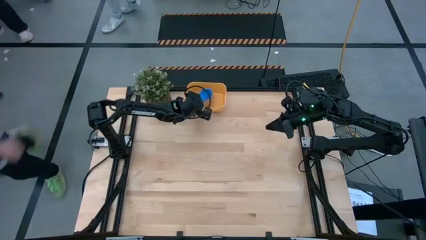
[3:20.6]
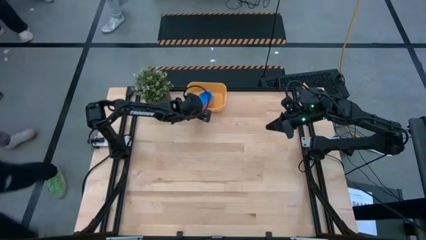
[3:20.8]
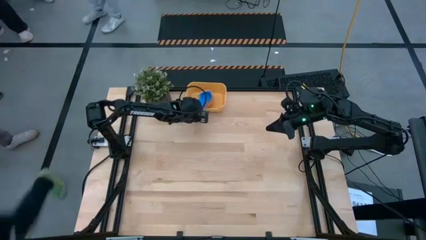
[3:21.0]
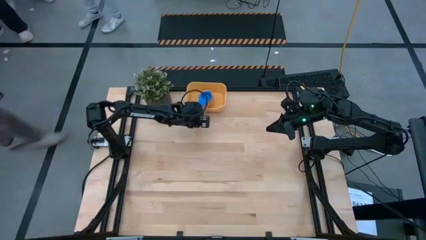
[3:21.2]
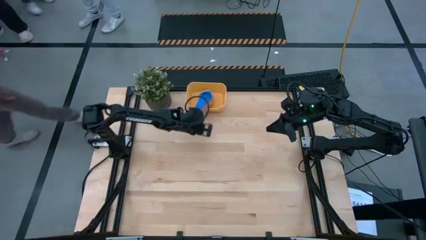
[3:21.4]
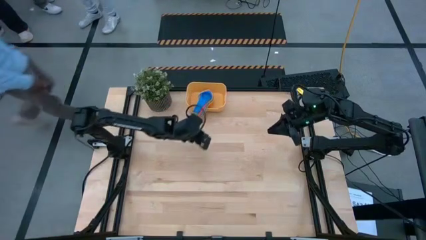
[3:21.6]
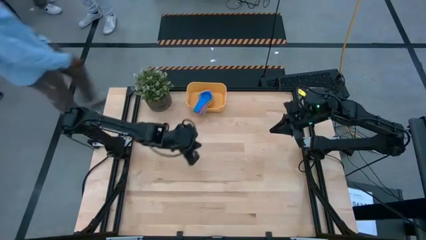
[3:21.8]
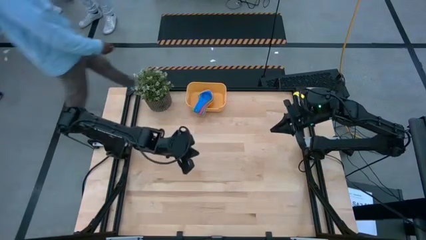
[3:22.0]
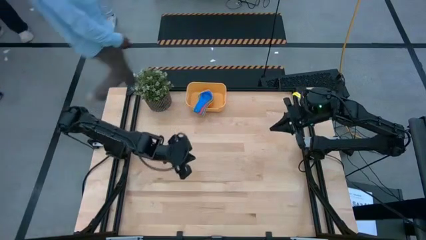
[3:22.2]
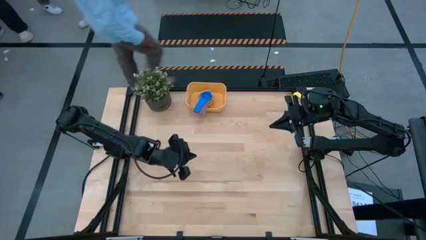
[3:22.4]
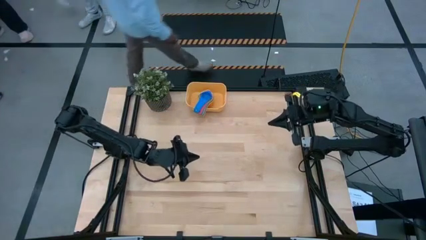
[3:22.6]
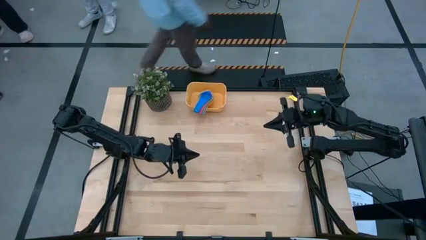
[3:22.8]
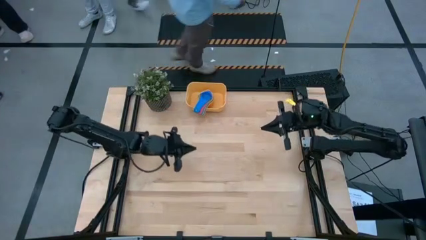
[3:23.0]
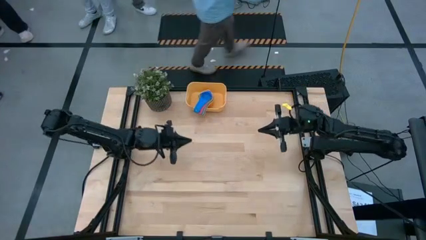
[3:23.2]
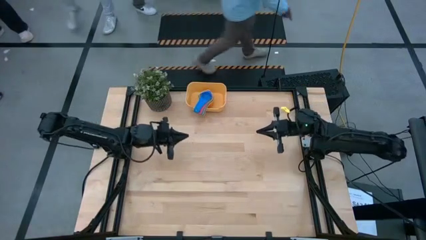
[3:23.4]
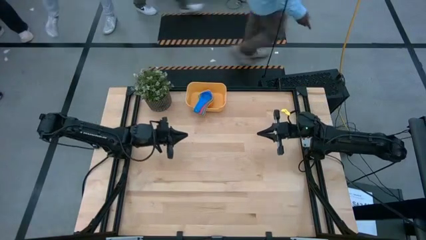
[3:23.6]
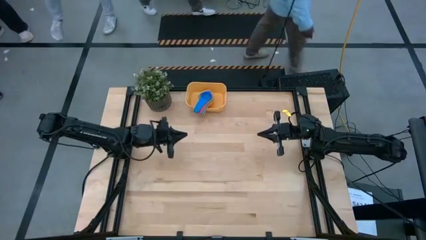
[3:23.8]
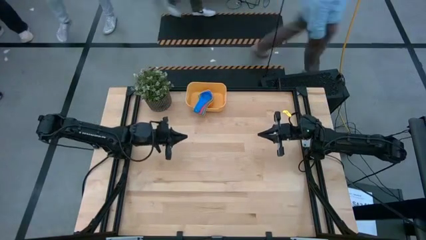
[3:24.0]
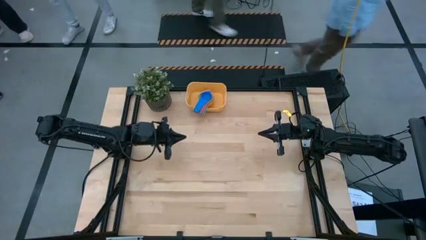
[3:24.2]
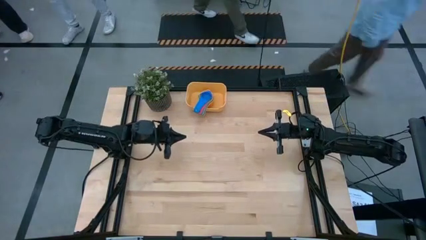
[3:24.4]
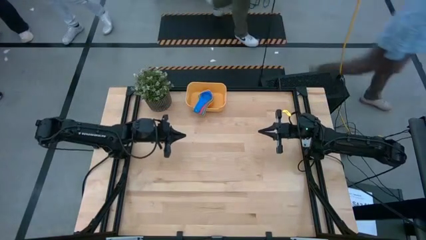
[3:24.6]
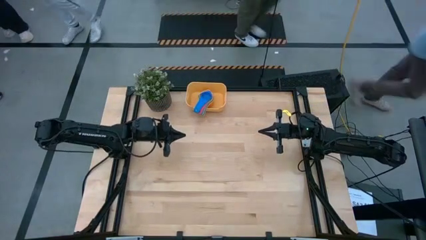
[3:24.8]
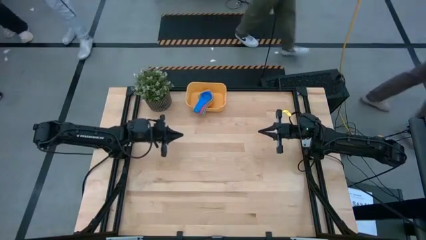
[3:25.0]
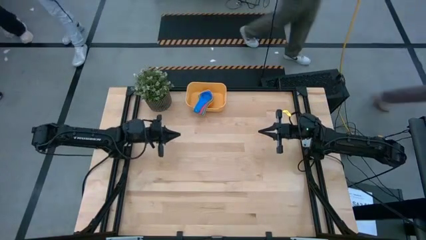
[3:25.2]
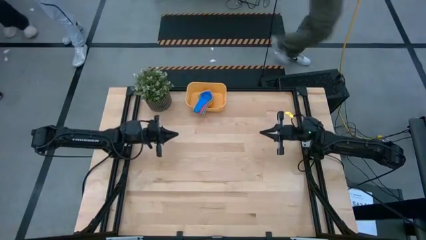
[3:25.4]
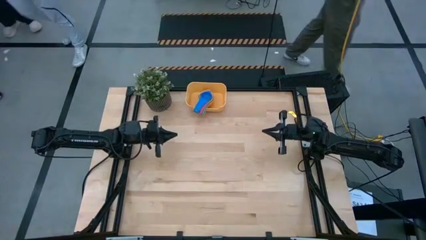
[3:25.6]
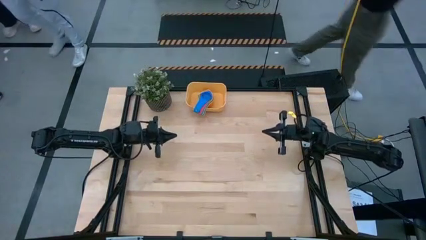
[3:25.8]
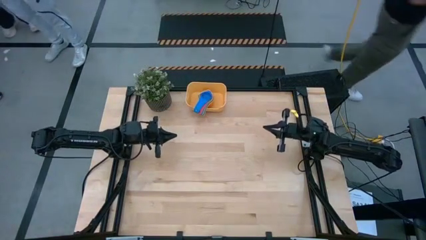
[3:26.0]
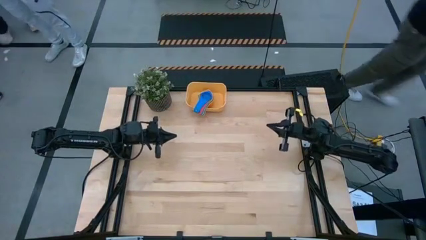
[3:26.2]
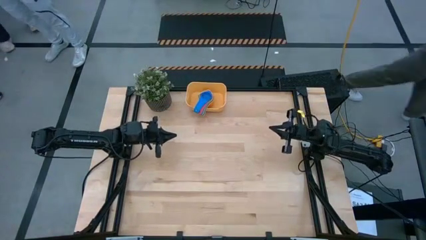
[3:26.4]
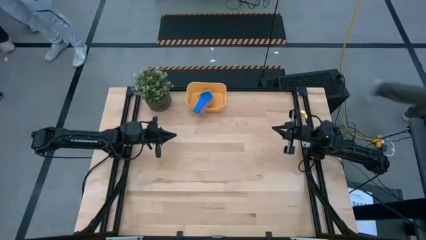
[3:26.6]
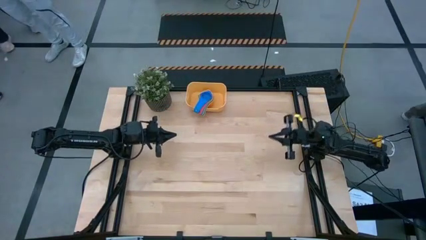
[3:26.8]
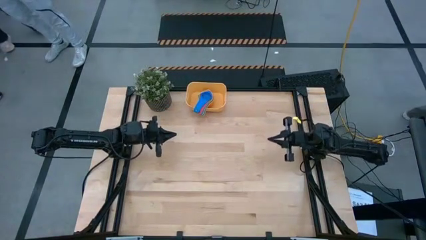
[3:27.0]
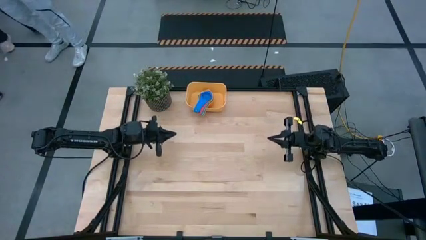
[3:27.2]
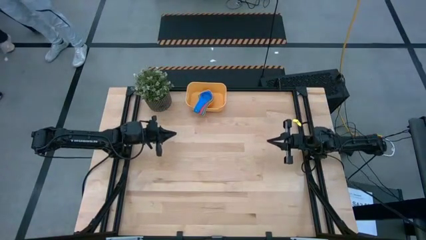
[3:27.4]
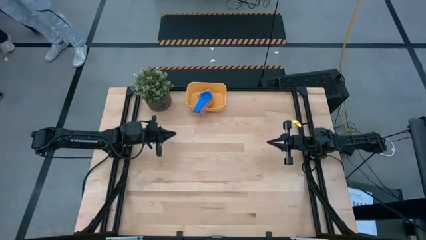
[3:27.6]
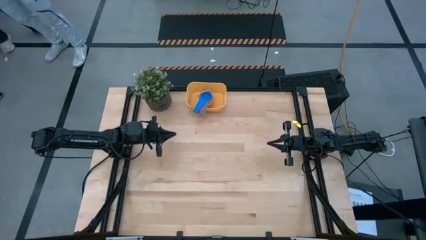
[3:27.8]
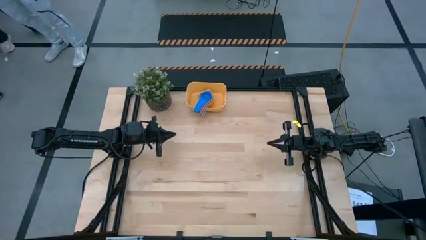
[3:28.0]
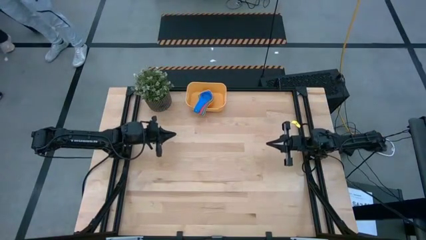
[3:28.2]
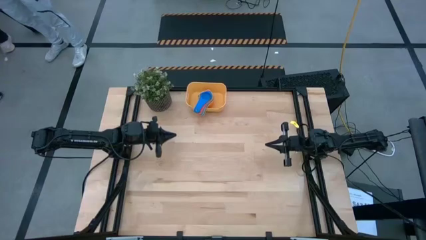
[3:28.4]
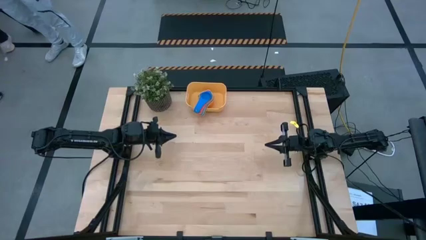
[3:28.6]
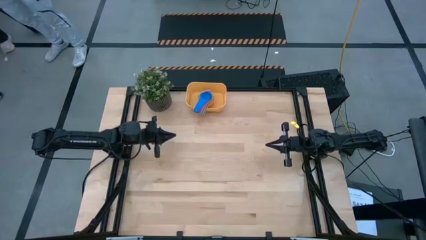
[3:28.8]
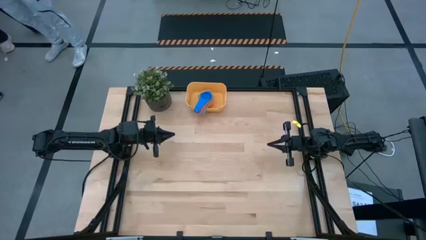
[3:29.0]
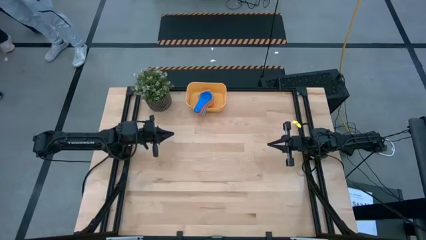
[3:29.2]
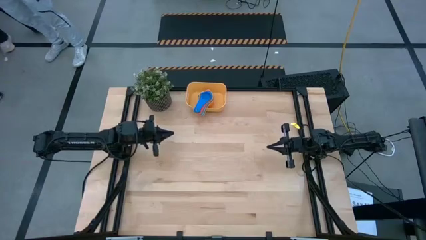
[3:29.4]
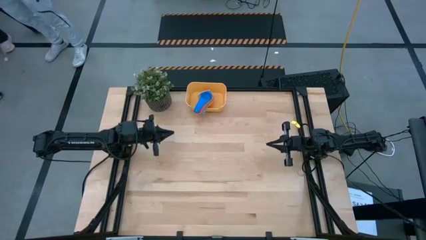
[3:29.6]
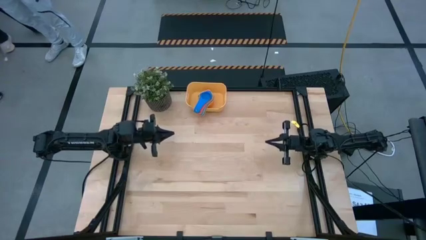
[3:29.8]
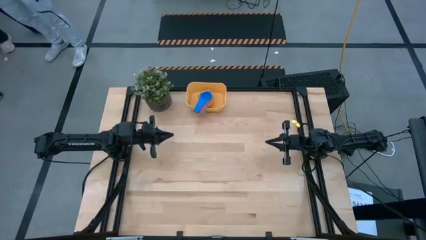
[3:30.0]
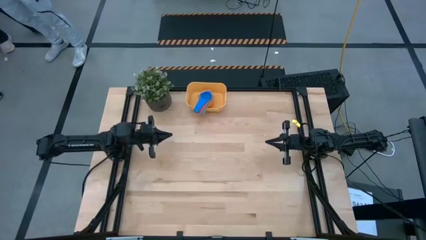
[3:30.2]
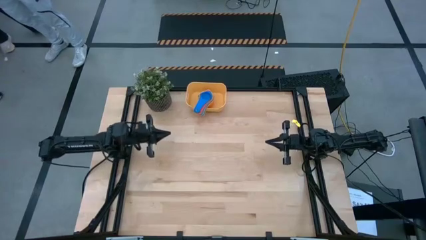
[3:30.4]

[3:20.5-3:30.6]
Task: Nest measuring cups in basket
Return to Home Position

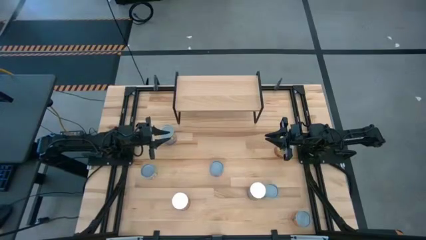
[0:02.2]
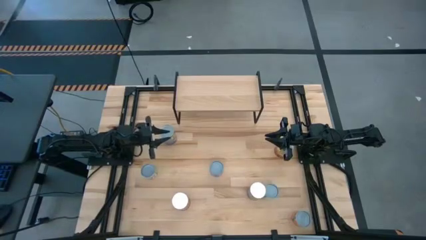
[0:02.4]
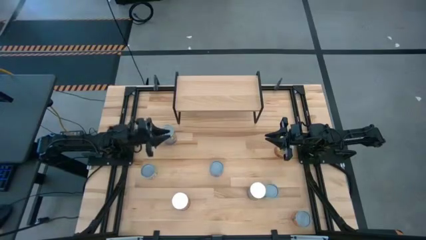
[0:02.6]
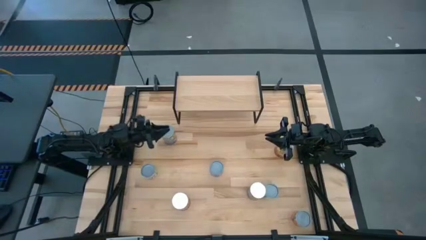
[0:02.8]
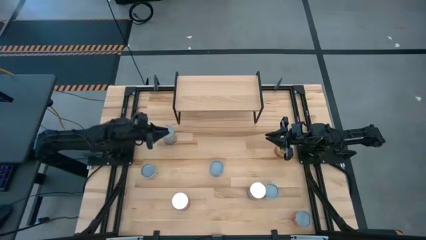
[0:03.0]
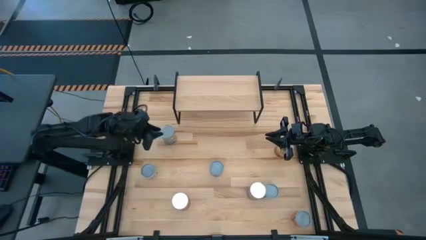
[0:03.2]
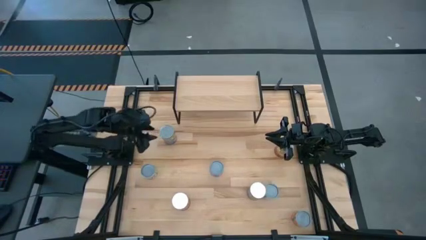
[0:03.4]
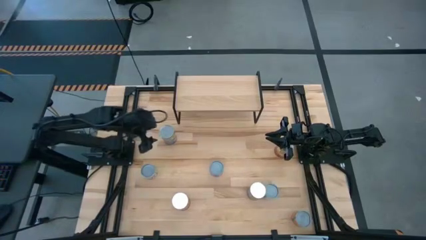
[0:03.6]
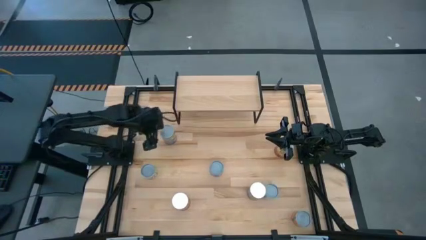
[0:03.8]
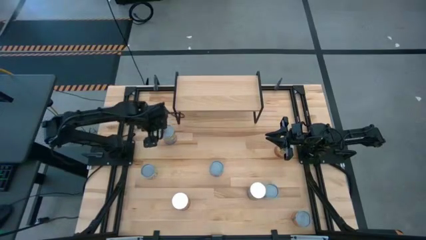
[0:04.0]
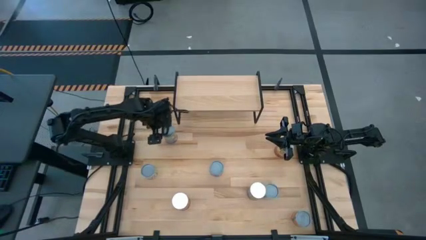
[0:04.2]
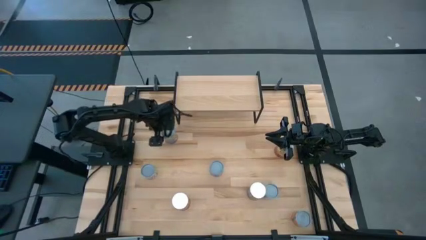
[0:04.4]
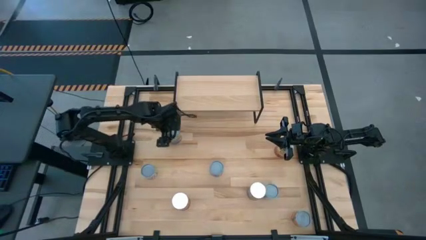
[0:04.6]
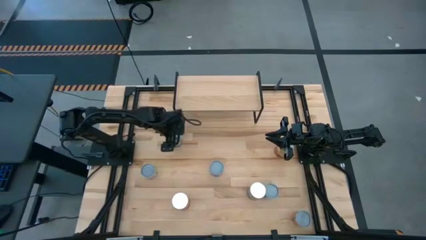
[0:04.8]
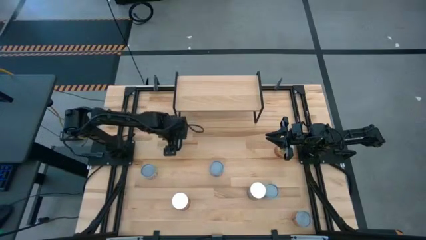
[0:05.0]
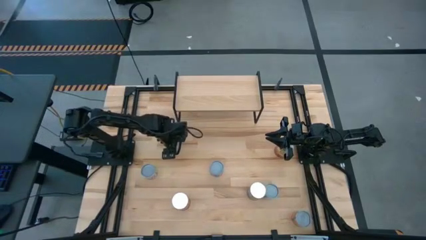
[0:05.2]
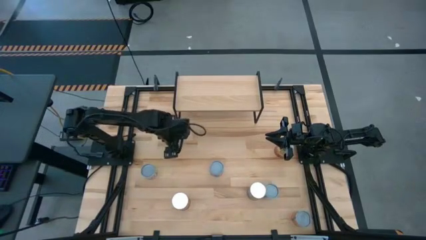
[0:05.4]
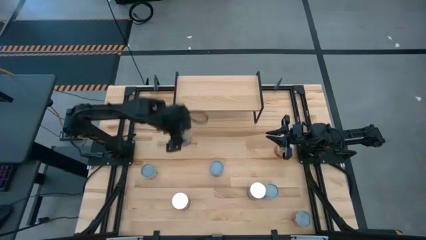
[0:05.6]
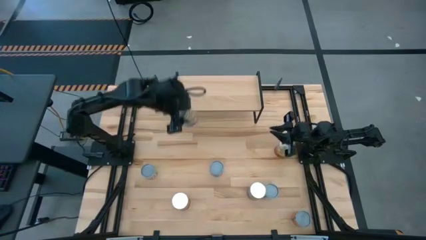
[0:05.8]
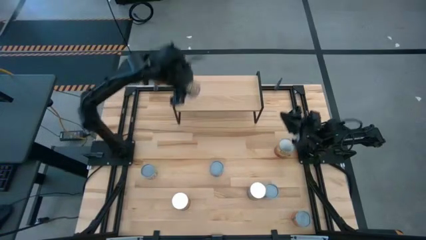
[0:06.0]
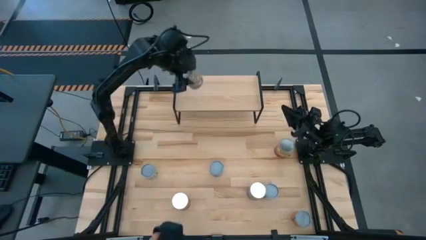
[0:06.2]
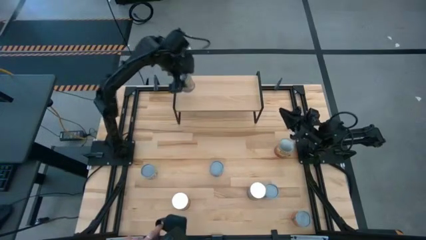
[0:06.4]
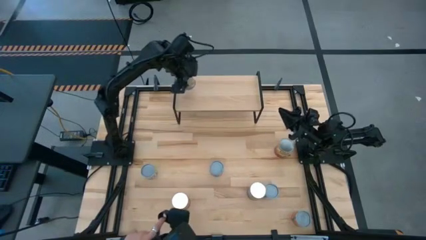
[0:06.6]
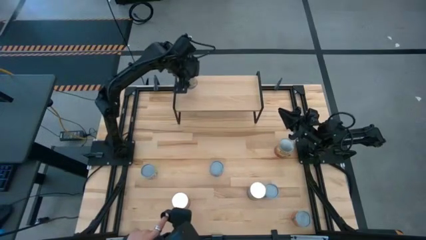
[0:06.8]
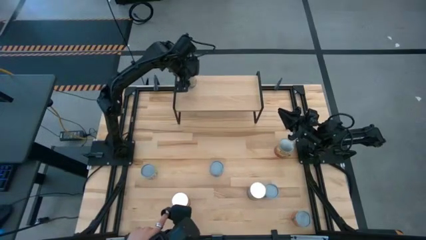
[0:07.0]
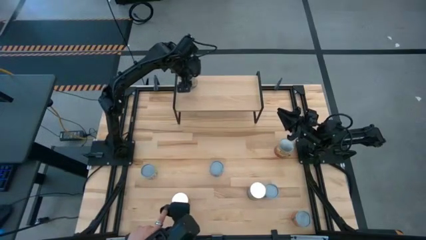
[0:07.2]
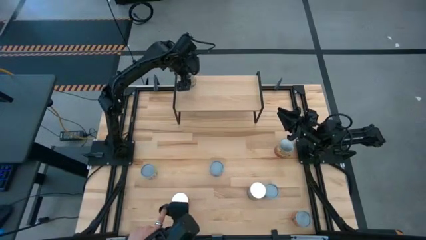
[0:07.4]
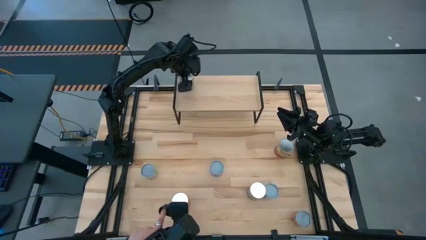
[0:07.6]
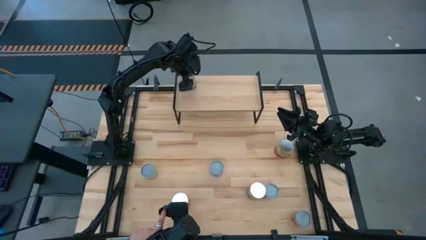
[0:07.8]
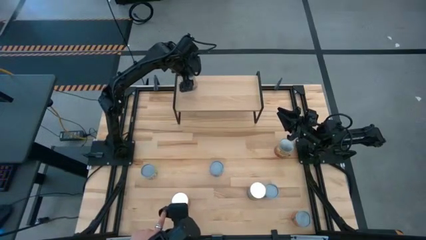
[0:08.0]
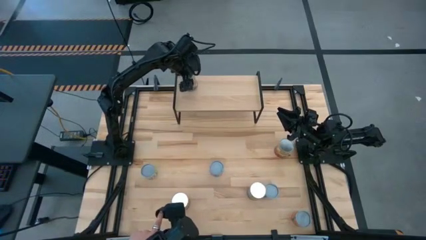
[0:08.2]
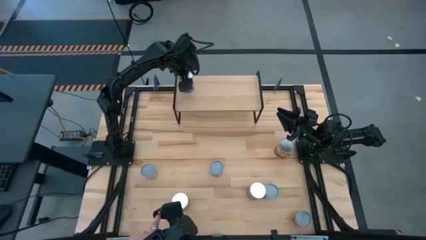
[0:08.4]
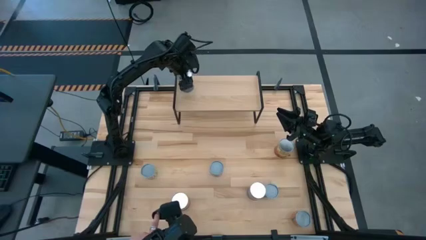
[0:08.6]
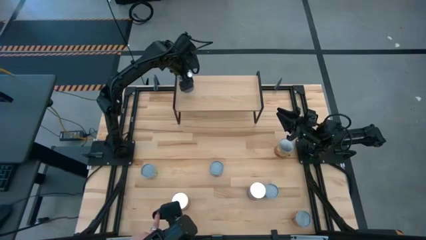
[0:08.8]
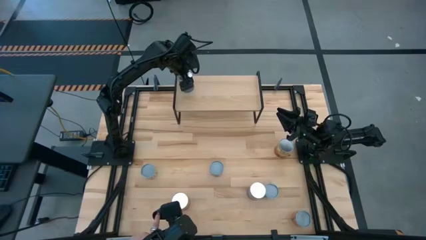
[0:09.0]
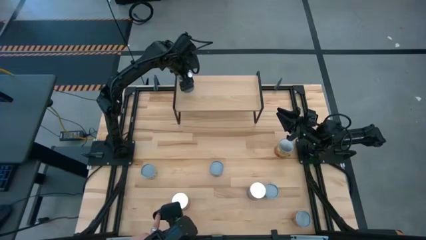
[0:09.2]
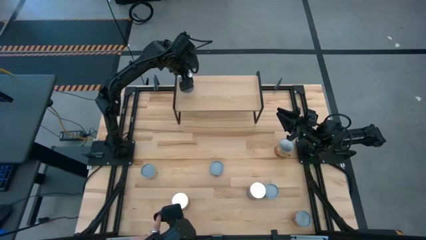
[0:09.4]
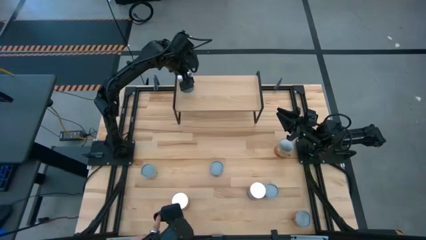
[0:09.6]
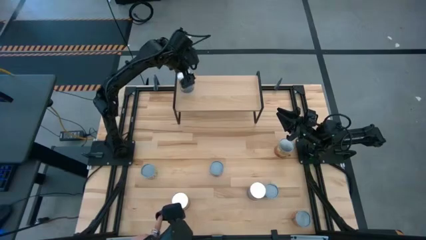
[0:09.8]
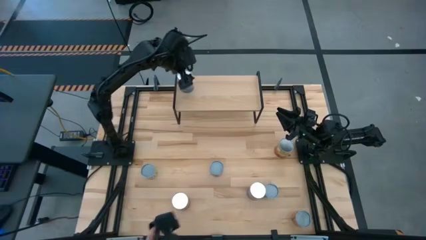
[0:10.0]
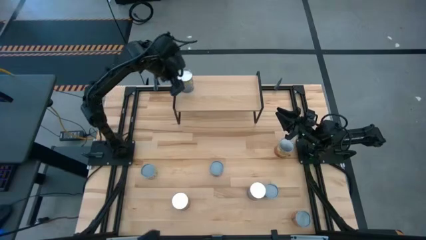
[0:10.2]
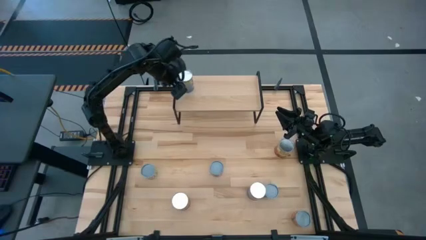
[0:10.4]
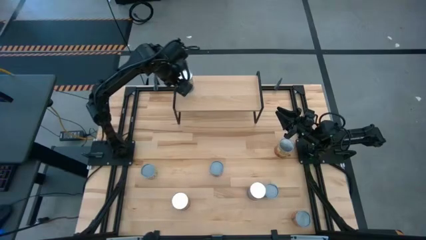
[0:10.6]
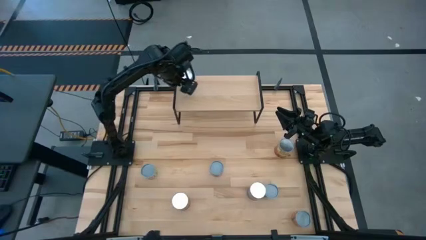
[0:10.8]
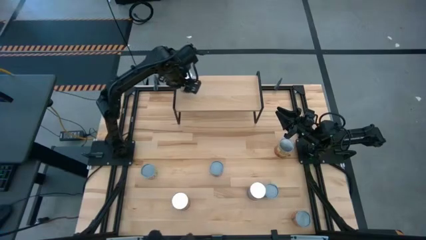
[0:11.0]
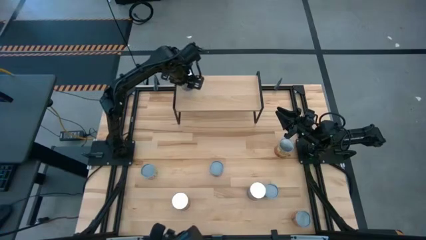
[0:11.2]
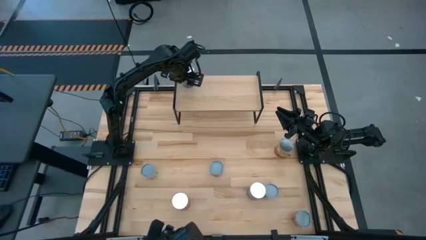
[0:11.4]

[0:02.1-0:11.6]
Task: Pick and place cans onto a shelf
Put the top canned peaches on the shelf
